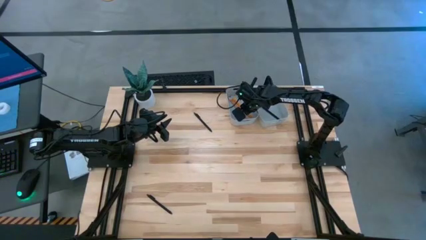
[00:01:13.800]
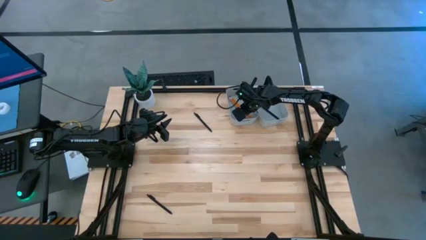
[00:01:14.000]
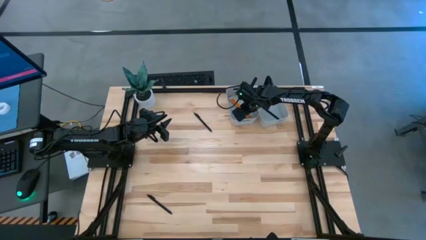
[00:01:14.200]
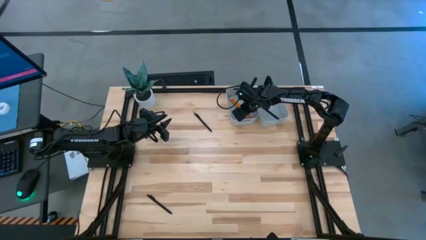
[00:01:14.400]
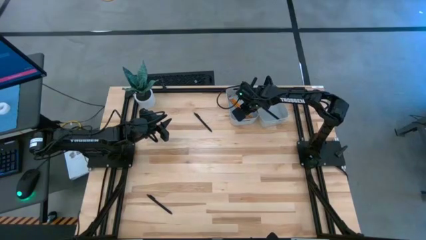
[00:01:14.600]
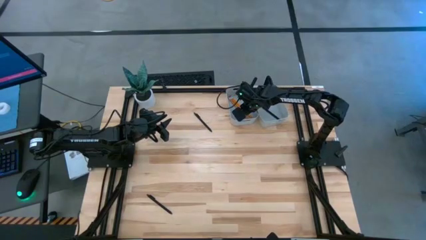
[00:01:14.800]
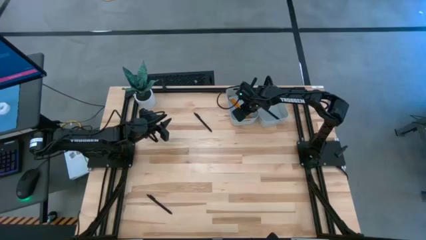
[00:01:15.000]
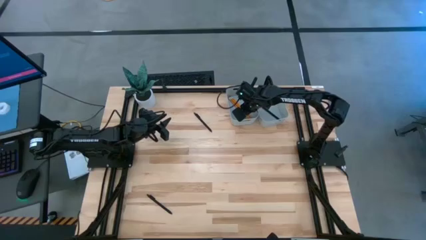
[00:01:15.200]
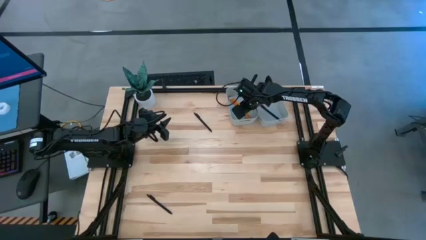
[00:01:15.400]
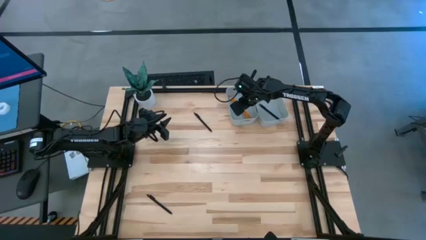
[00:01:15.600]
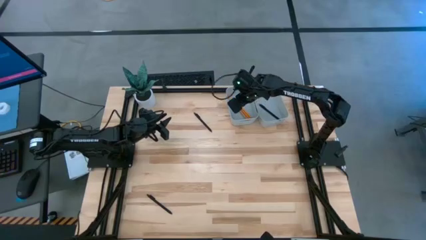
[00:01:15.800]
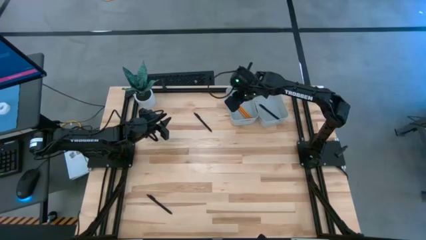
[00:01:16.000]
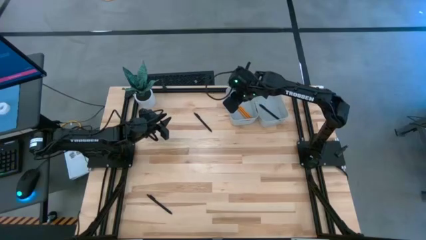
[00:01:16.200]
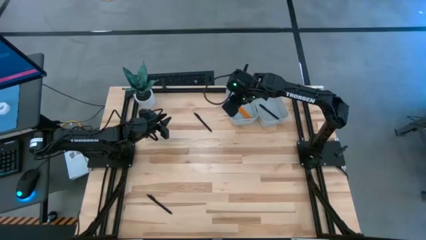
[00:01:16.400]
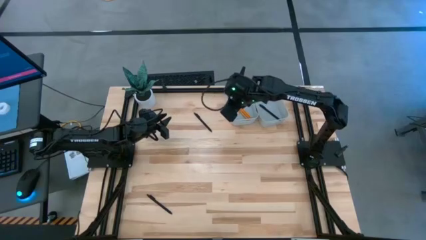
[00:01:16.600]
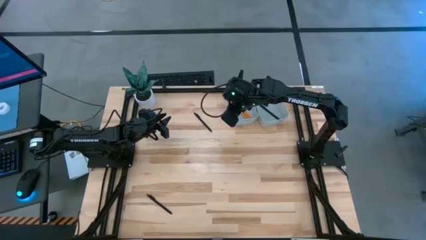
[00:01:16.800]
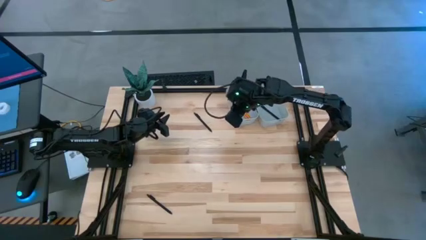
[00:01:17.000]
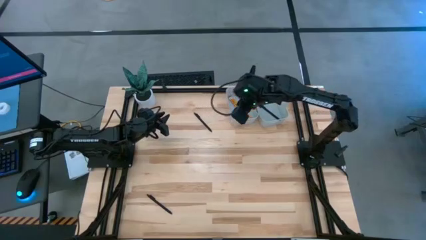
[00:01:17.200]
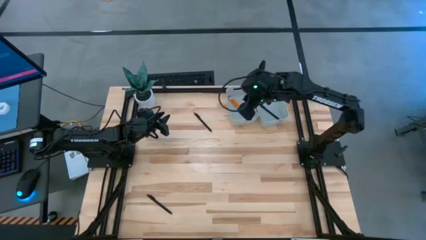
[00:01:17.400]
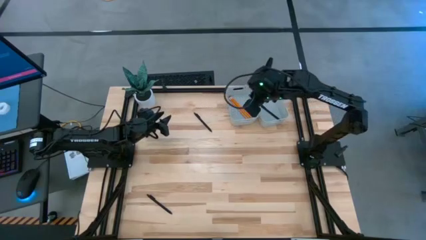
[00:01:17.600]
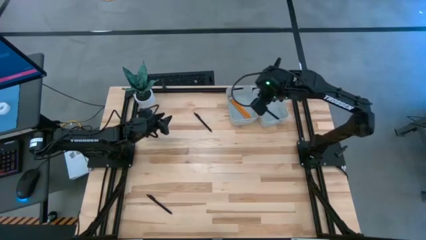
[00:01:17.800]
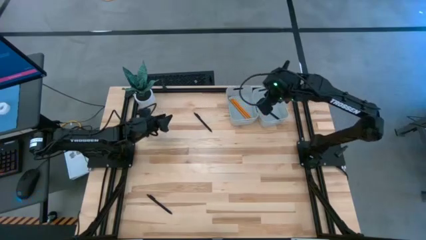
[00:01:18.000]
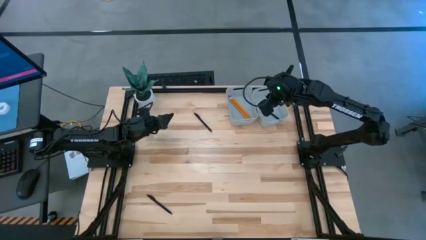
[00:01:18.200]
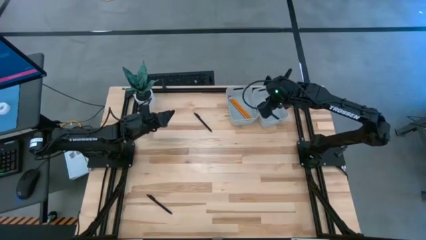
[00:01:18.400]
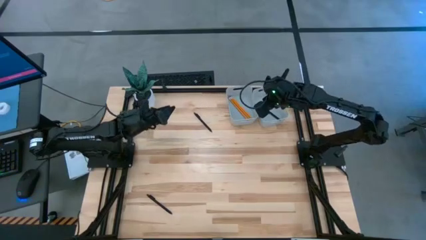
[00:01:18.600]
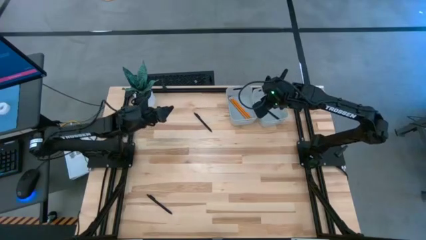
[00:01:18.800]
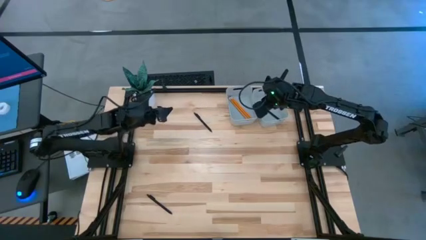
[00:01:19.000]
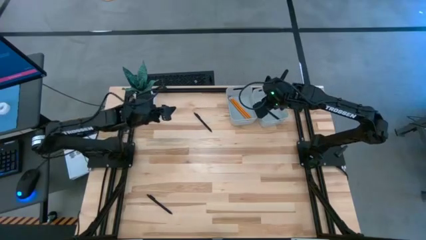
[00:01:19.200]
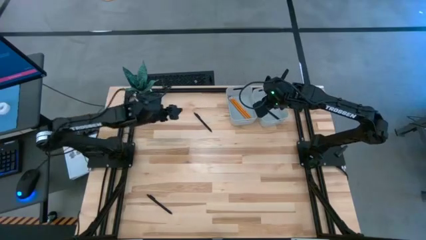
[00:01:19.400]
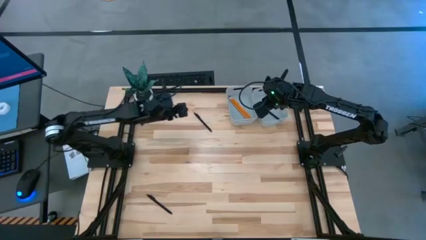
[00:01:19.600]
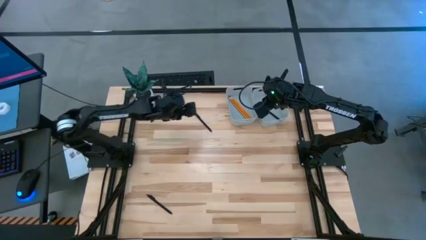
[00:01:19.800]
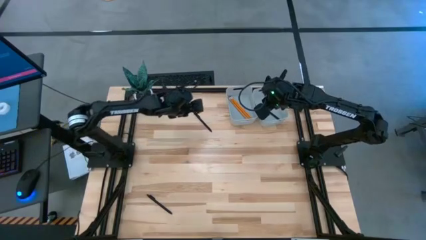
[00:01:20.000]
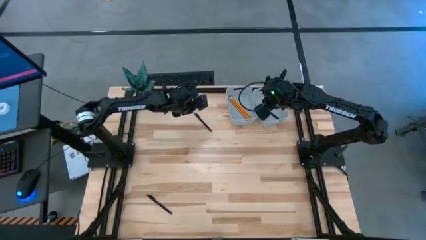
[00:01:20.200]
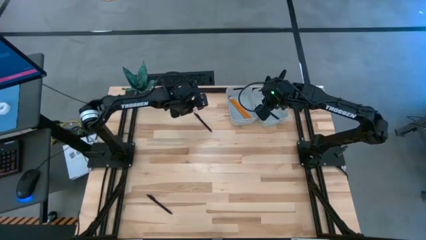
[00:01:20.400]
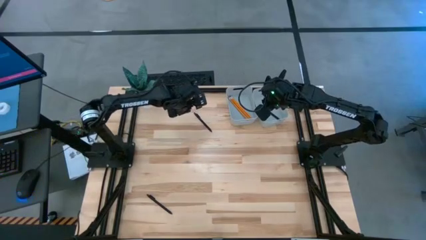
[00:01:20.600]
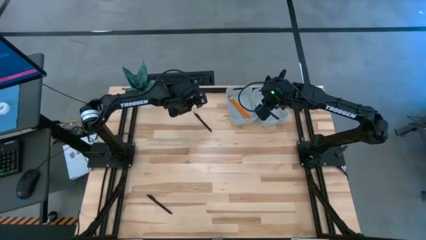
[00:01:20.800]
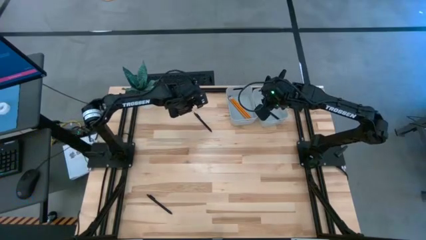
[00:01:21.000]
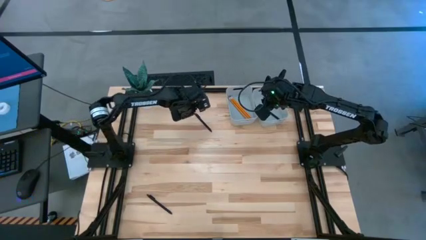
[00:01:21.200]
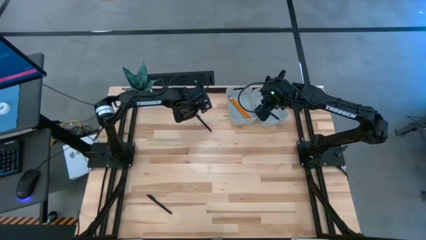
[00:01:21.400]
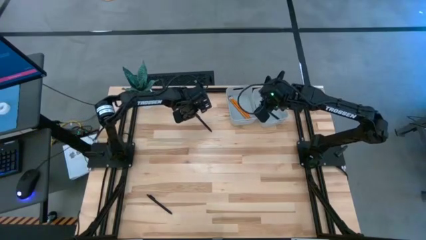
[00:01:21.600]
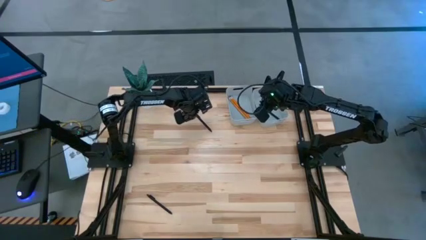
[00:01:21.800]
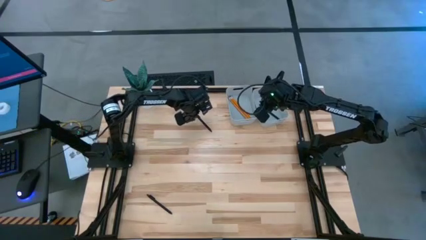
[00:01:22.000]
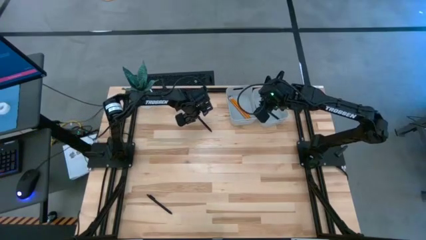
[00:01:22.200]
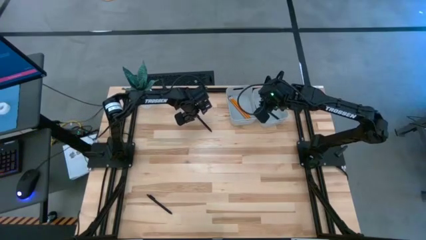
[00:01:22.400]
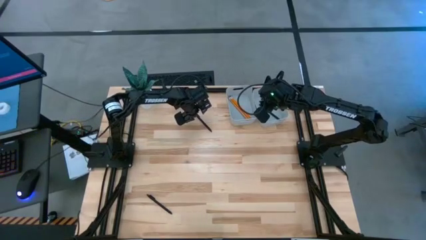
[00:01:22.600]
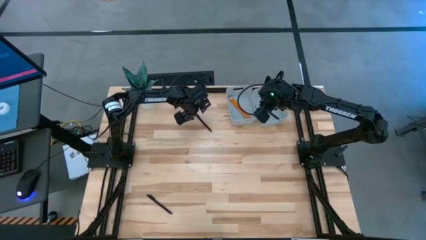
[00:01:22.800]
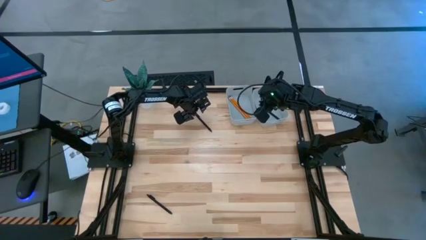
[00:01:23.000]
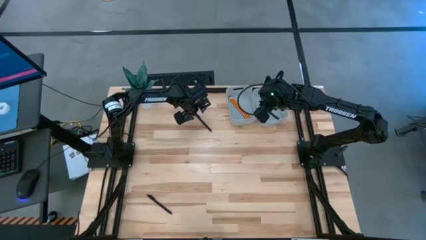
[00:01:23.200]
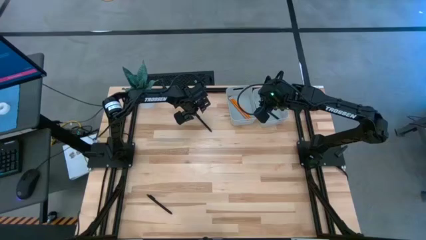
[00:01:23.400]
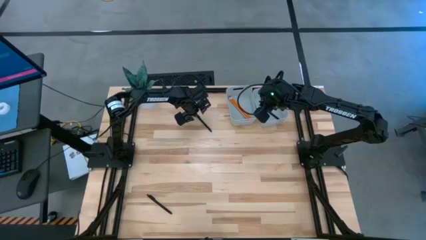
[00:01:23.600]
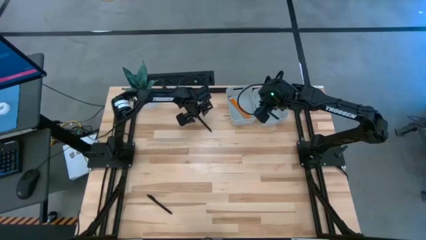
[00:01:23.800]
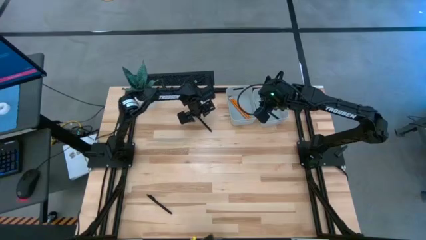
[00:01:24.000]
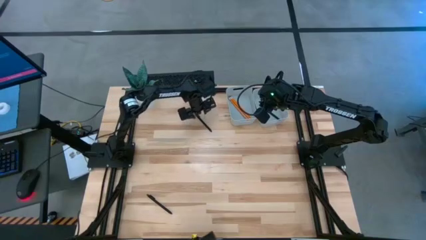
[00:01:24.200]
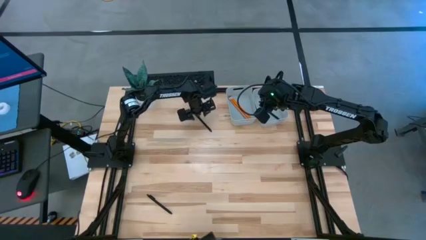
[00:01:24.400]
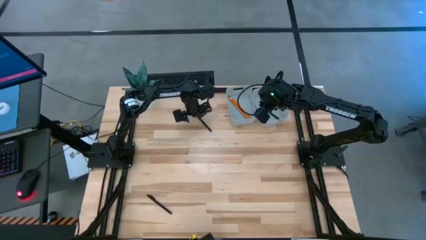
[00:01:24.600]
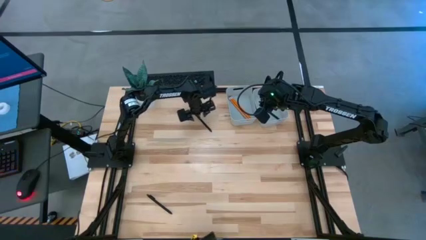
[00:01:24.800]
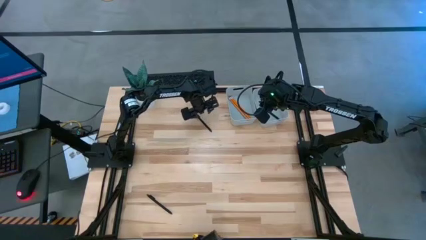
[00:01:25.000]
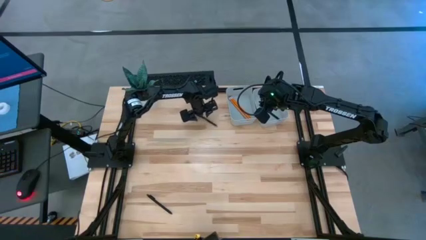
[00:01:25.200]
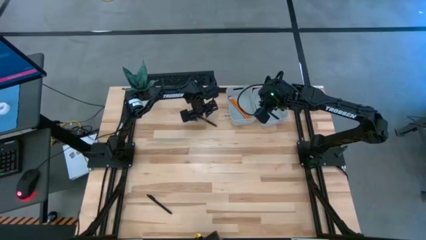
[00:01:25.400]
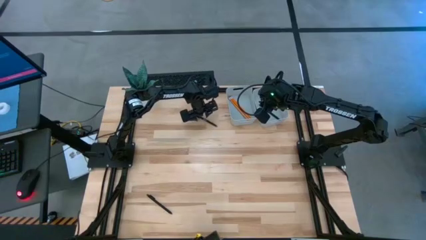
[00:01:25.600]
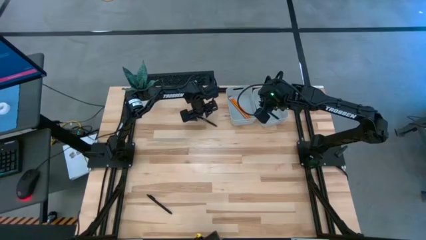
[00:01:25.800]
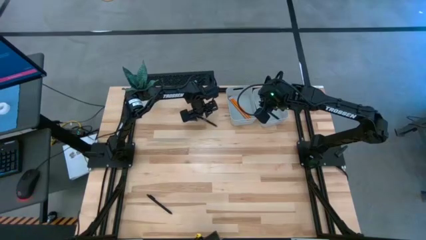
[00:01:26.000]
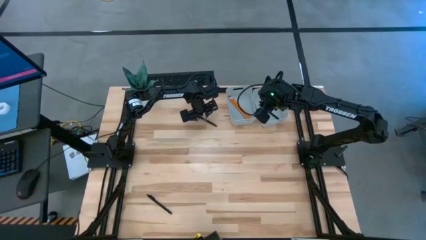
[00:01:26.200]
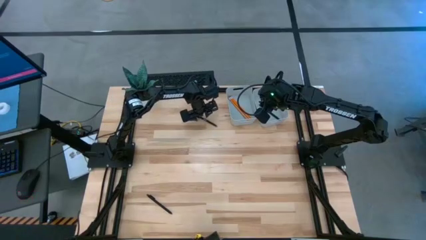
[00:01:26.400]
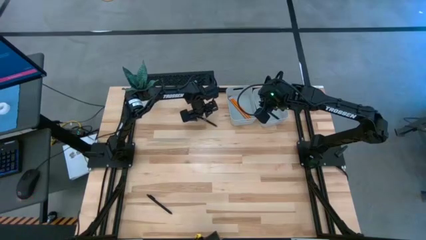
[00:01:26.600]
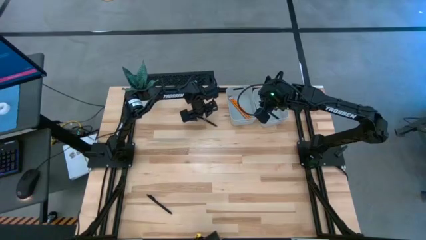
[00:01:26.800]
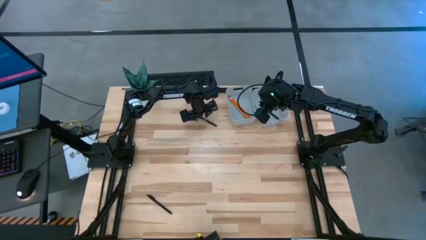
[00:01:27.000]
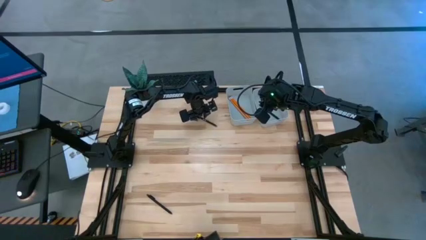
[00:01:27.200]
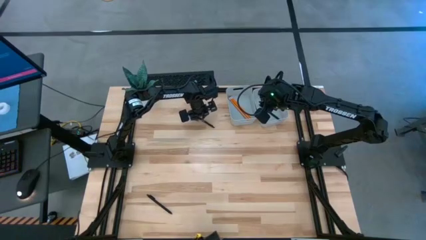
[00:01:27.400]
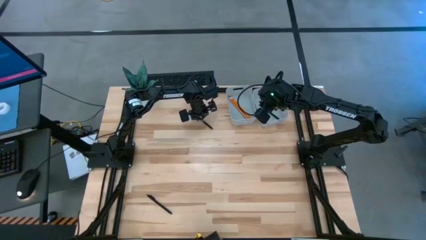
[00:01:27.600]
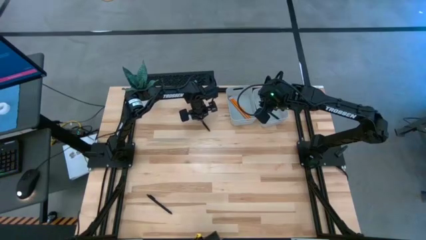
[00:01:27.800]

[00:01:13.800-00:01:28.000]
Task: Sort pens & pencils
Put the top black pen into the right gray bin
